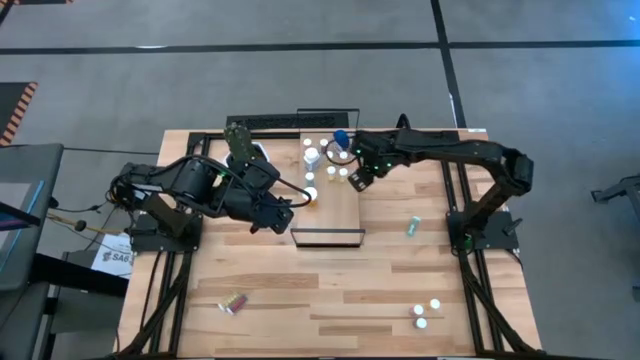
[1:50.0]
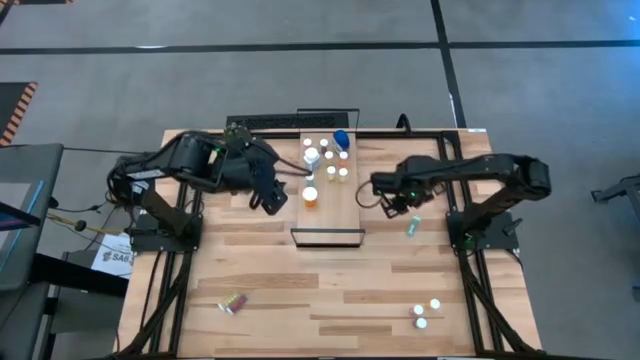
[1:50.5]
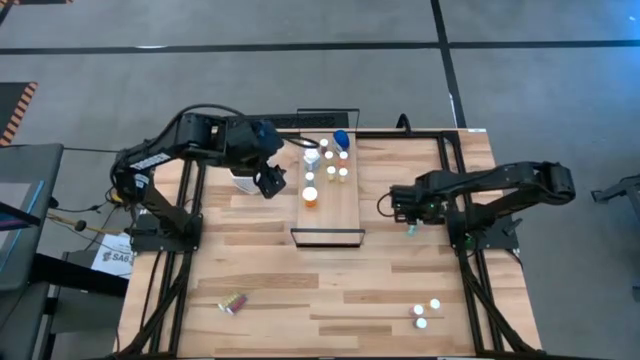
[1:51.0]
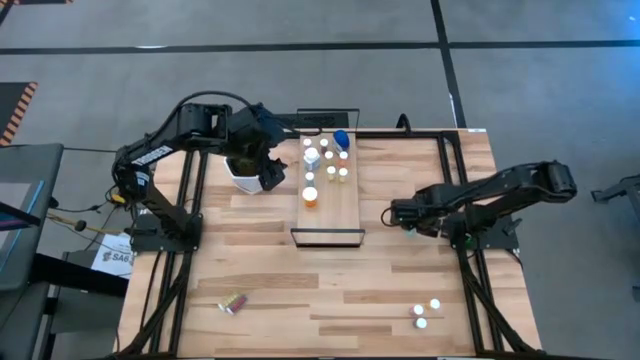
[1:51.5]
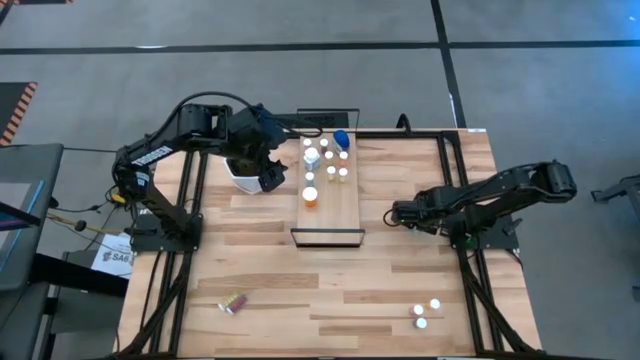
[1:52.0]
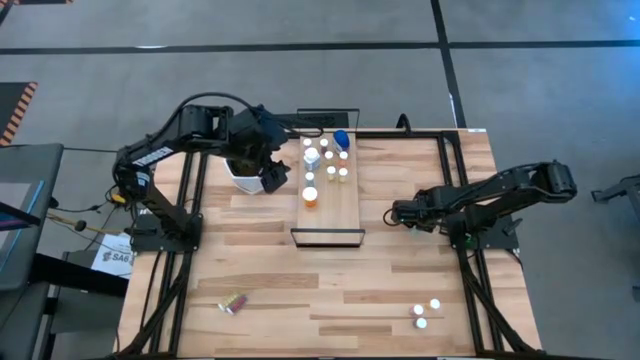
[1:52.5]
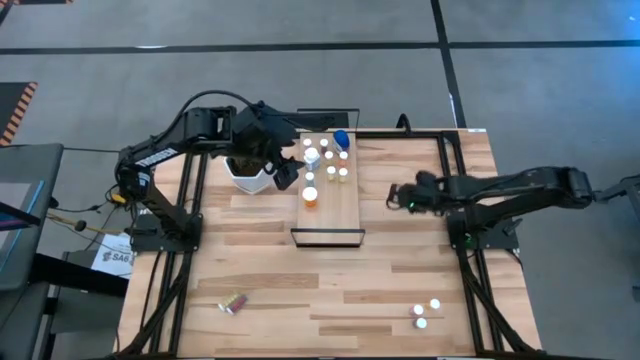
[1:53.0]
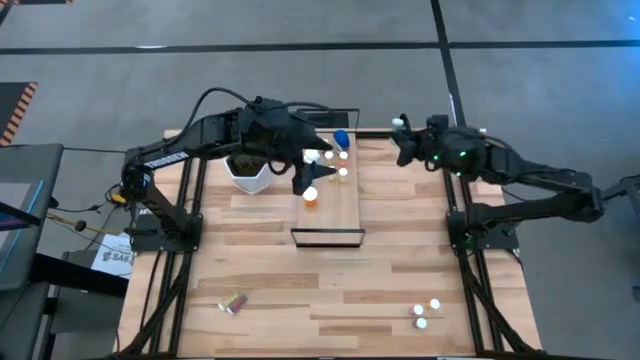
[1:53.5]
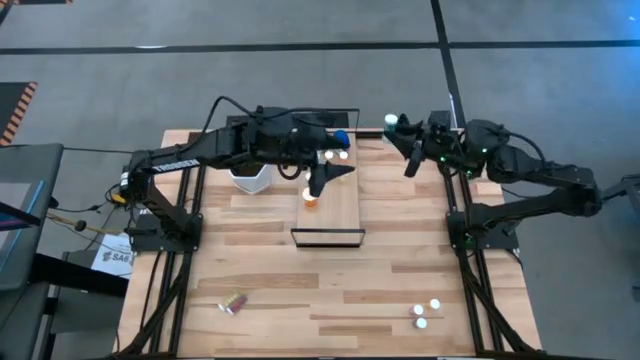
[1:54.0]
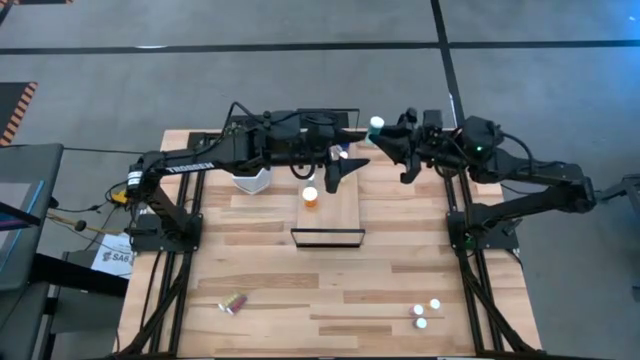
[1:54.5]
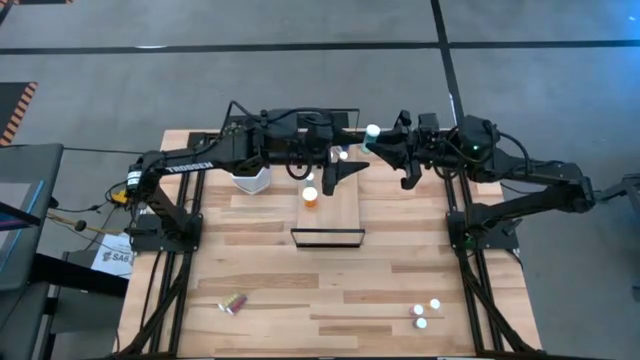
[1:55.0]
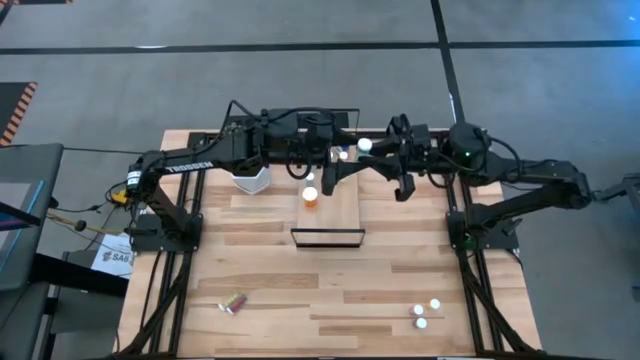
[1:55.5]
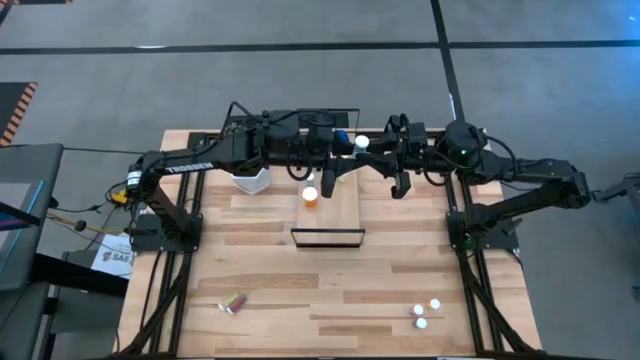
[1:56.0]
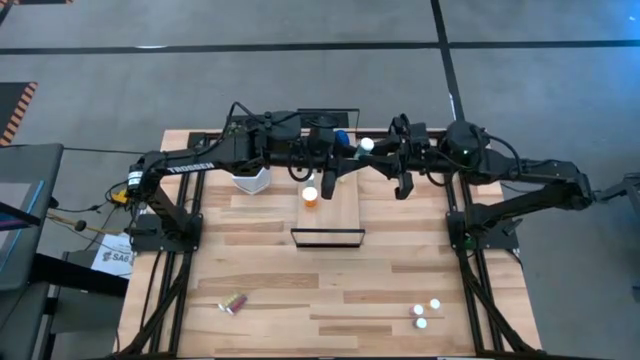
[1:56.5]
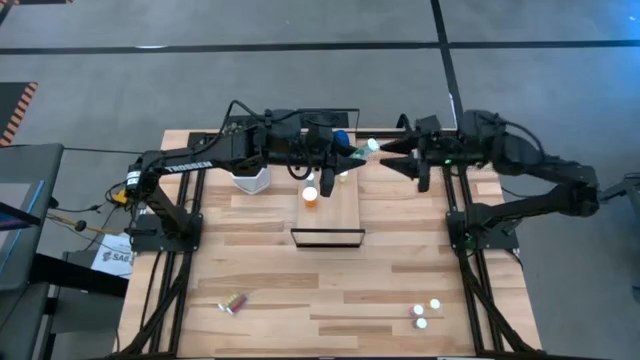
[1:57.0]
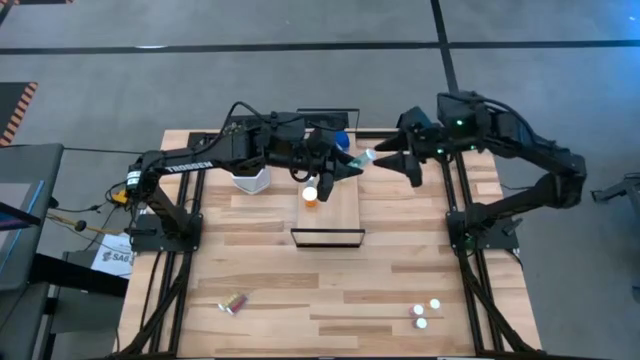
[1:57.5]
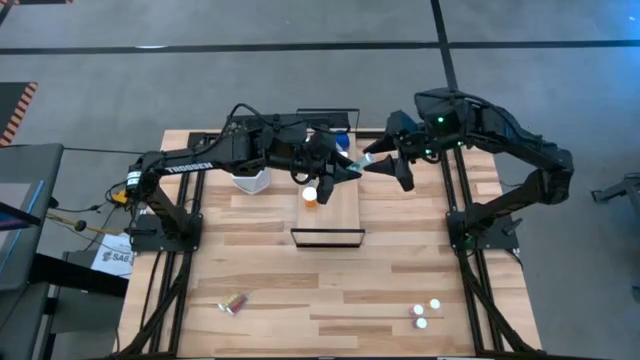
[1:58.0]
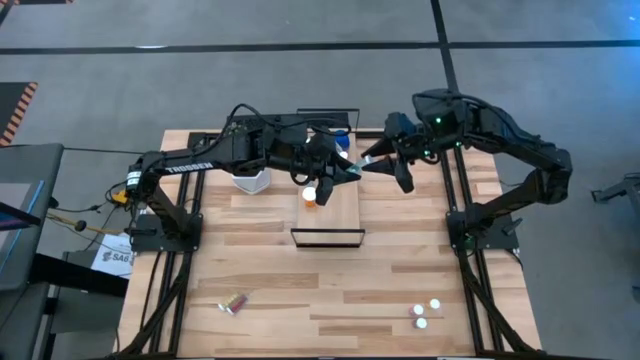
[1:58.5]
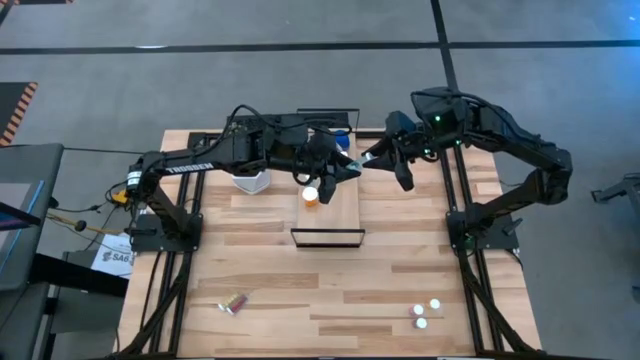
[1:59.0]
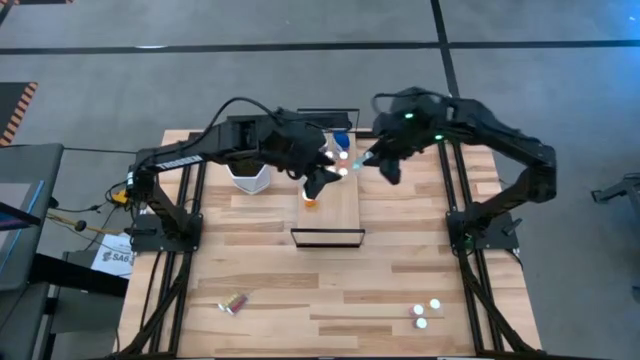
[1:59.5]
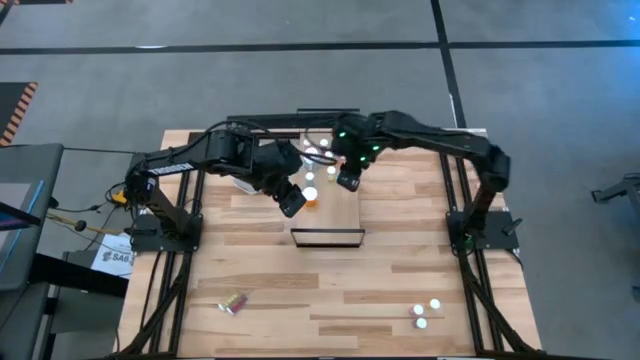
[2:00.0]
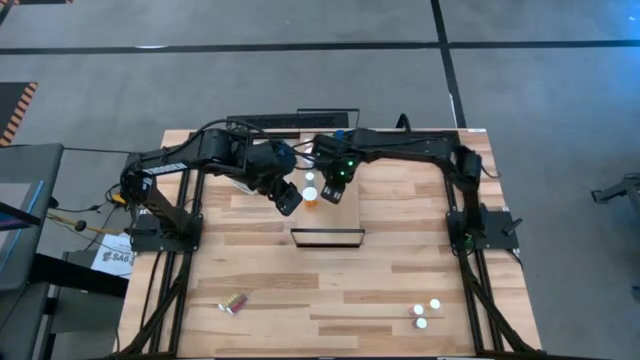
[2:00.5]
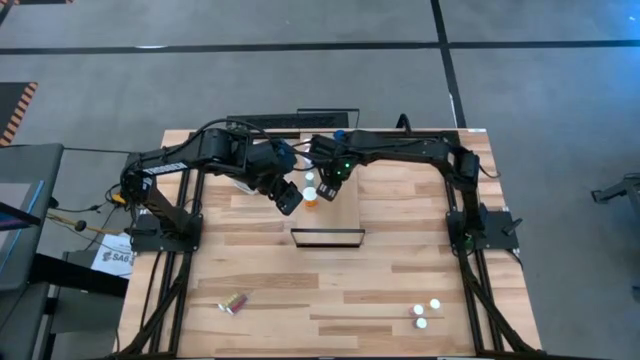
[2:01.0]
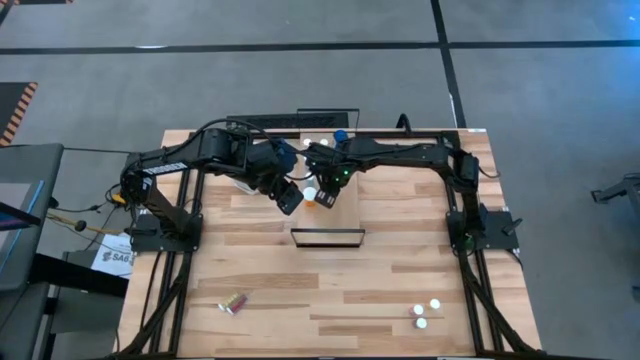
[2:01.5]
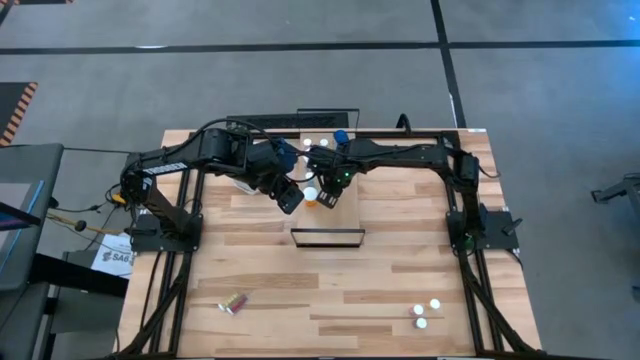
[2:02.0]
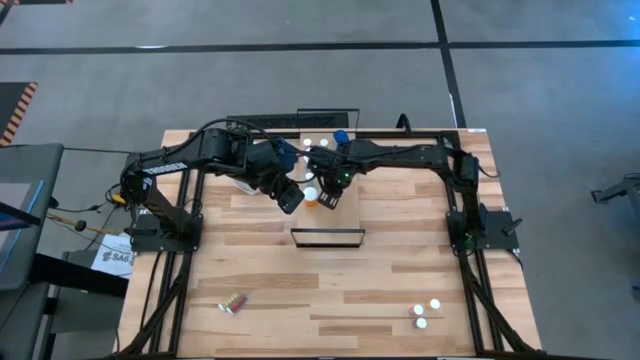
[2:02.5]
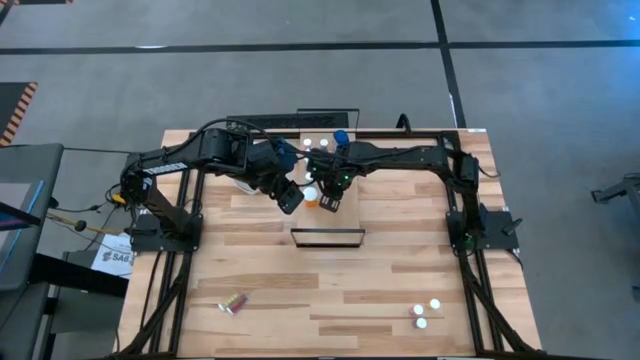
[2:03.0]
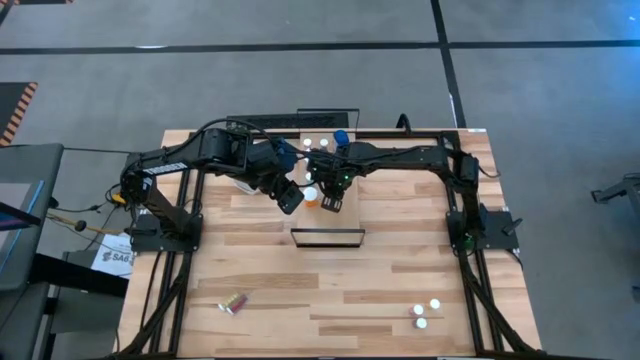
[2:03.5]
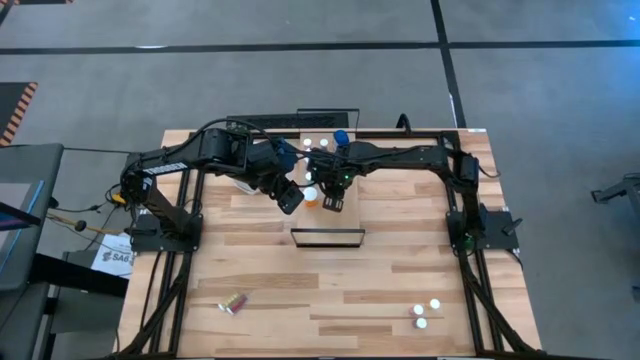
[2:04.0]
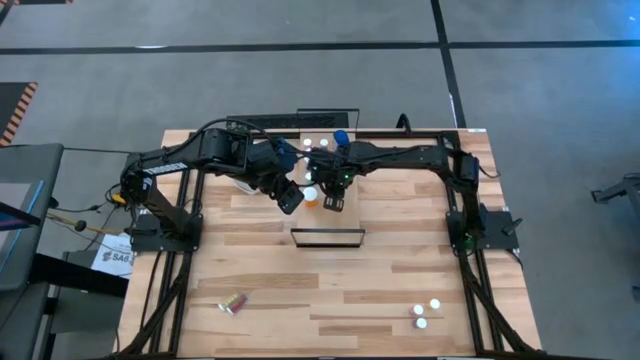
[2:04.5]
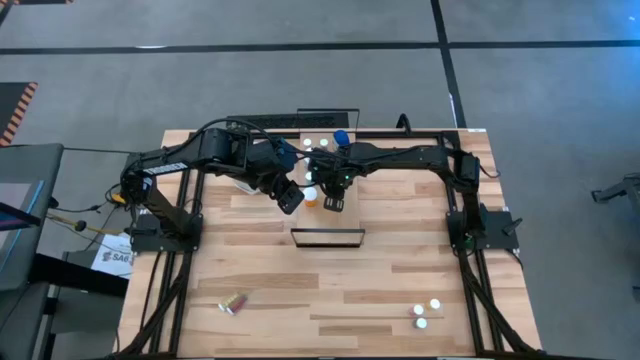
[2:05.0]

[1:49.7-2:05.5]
Task: Pick and place medicine bottles onto shelf by color
Put the blue pill bottle on the shelf

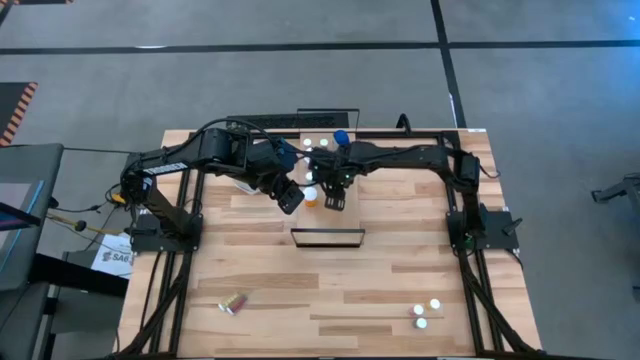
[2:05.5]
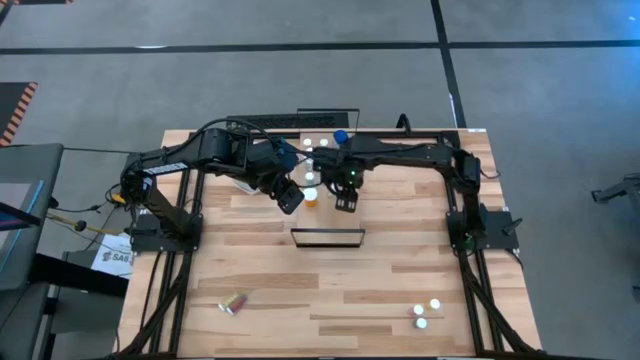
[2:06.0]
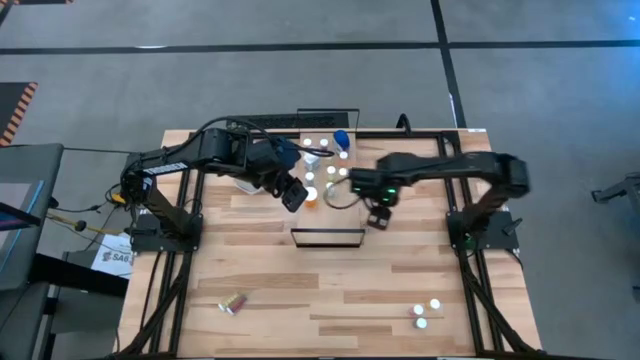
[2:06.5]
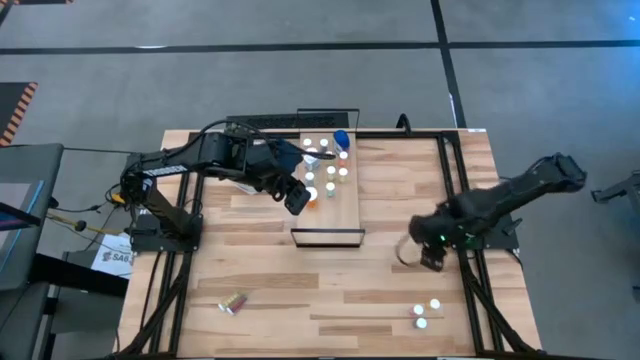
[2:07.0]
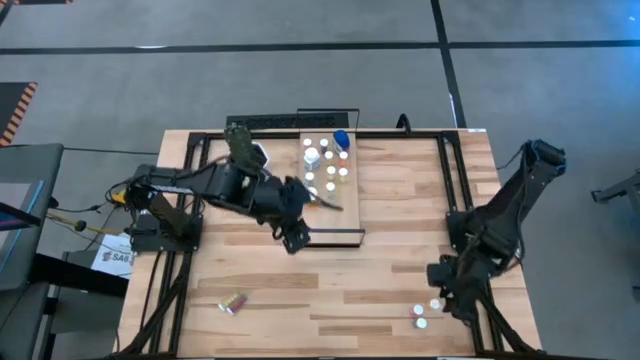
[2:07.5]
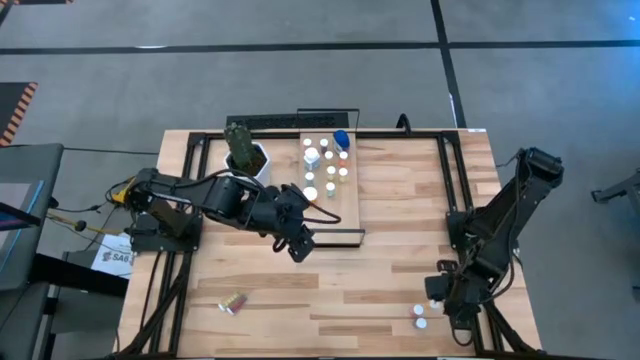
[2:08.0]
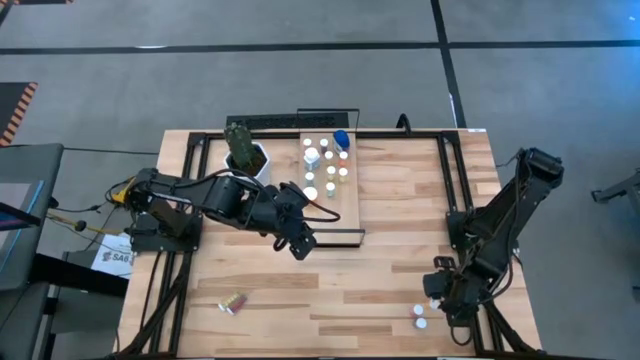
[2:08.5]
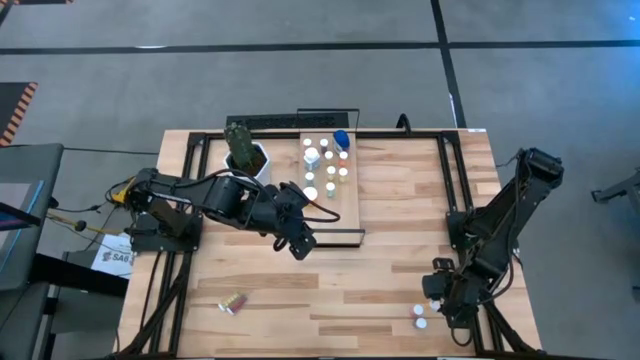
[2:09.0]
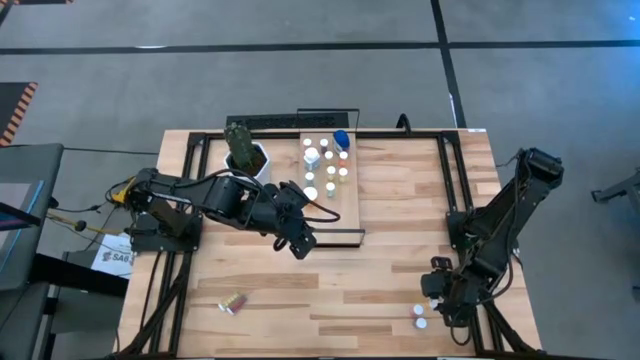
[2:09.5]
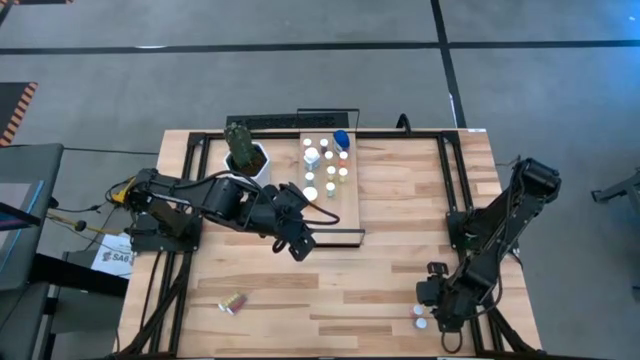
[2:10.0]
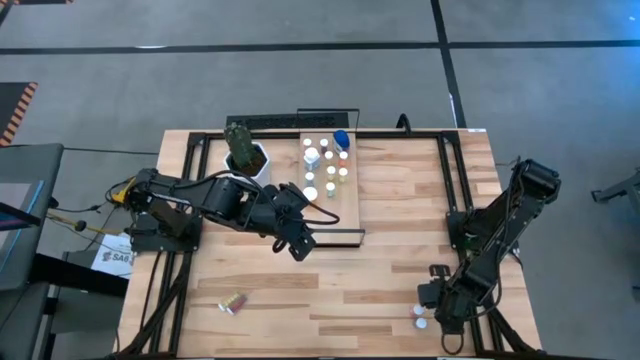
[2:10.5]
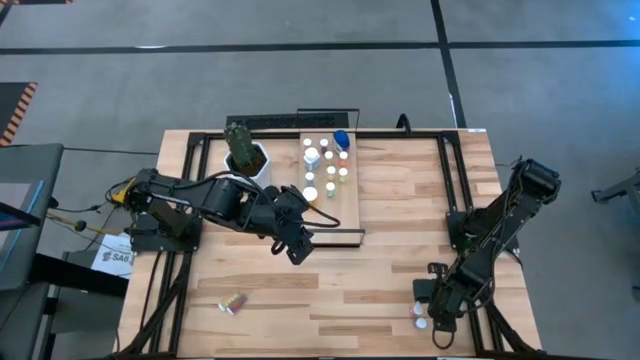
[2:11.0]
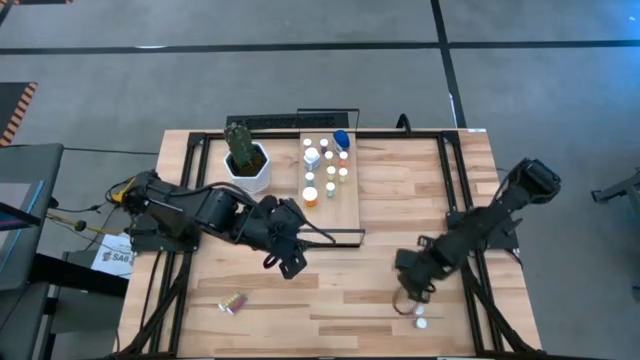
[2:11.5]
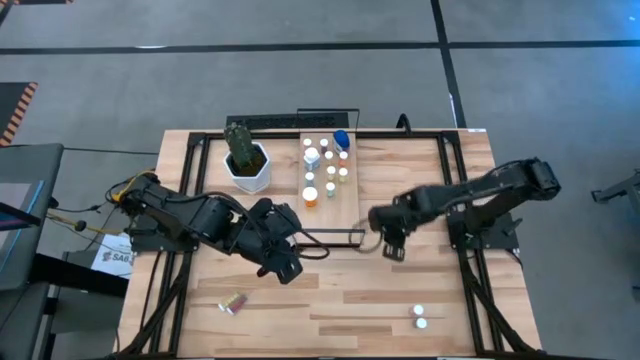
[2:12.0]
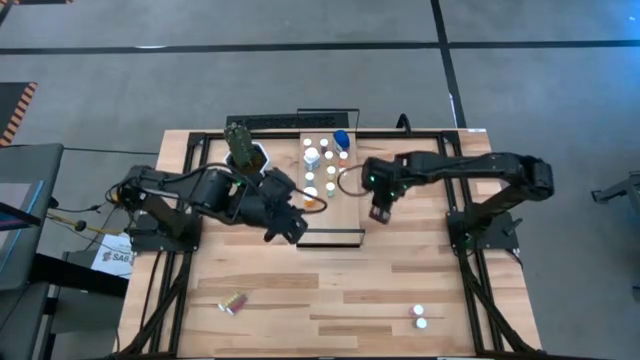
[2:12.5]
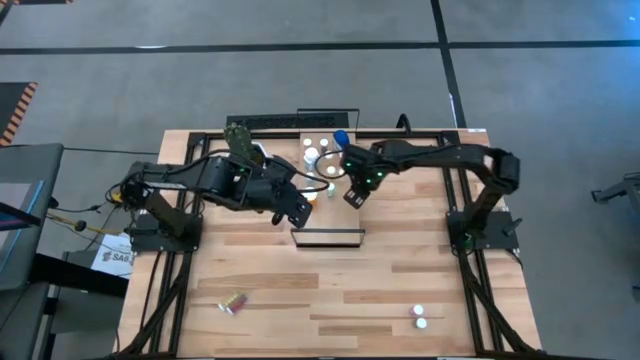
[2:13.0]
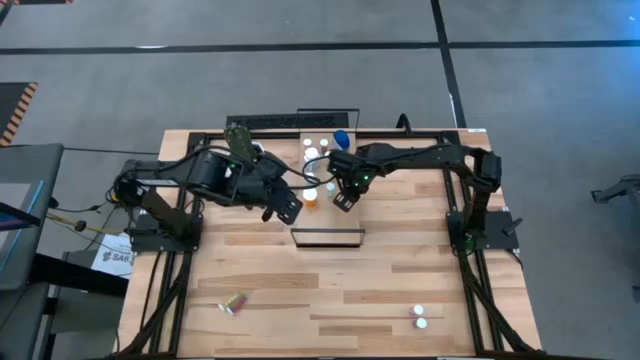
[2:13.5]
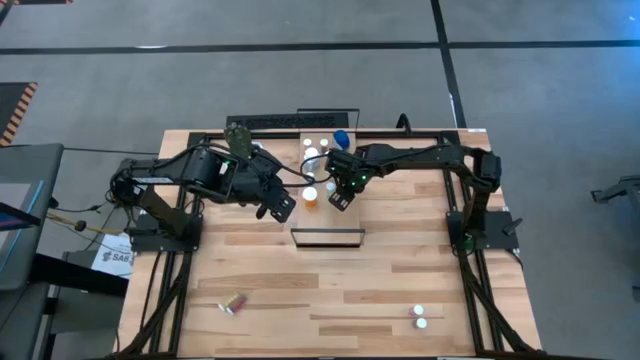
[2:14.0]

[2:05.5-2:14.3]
Put the yellow pill bottle on the shelf
